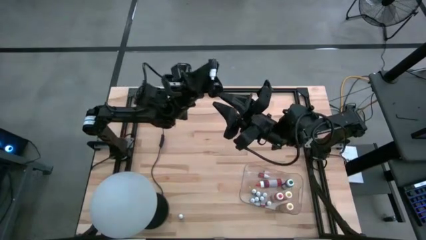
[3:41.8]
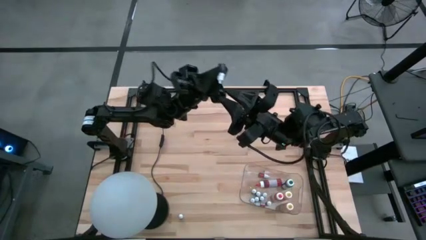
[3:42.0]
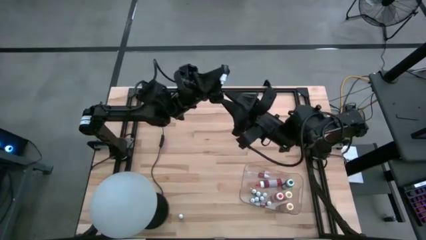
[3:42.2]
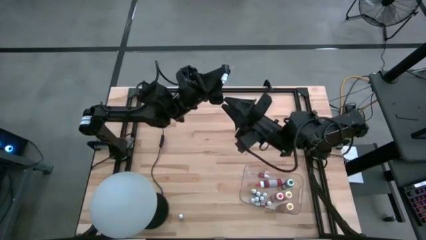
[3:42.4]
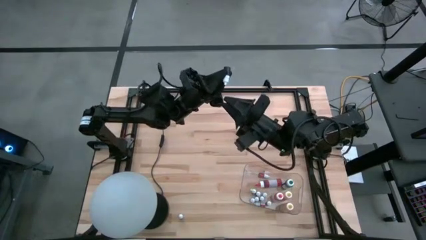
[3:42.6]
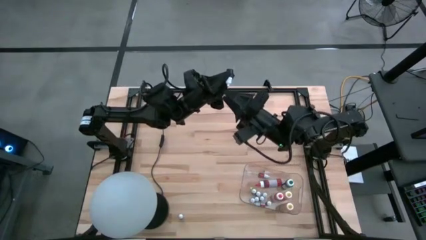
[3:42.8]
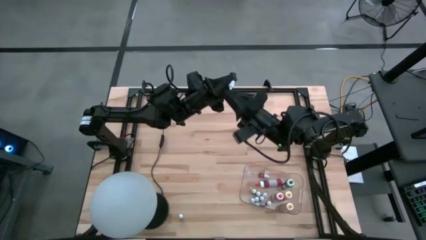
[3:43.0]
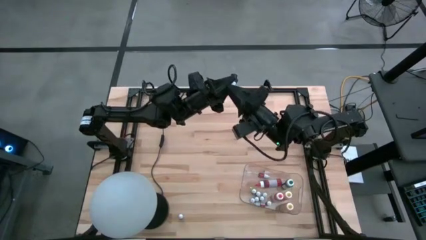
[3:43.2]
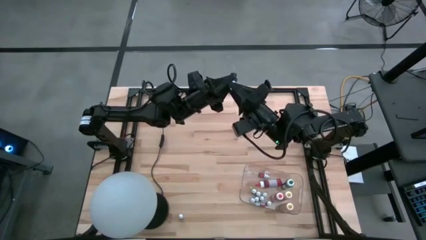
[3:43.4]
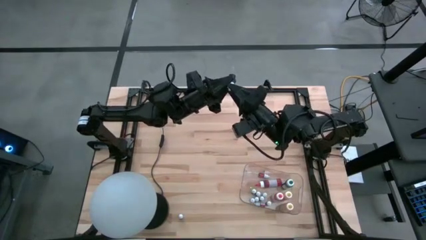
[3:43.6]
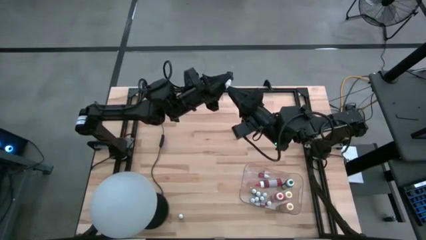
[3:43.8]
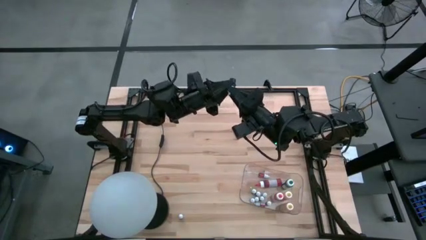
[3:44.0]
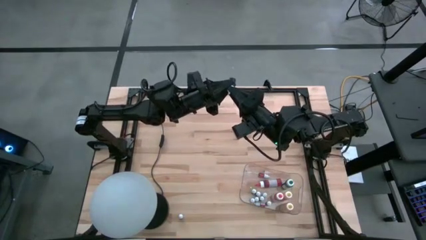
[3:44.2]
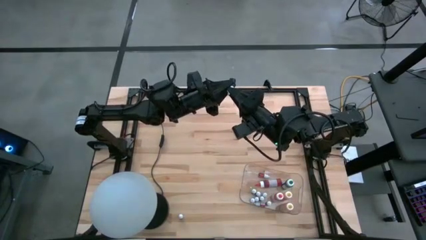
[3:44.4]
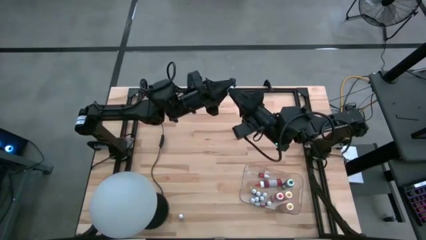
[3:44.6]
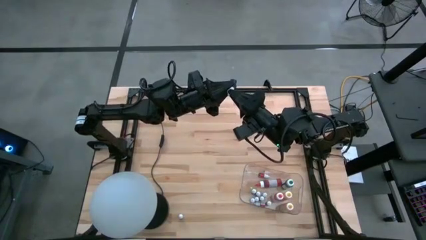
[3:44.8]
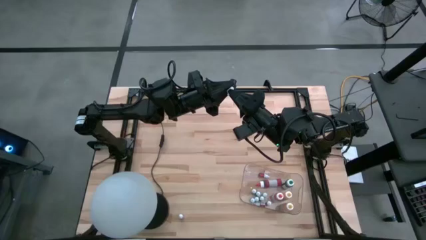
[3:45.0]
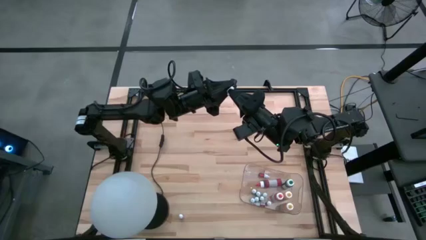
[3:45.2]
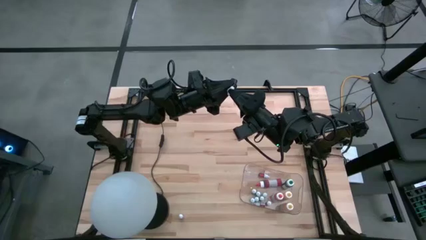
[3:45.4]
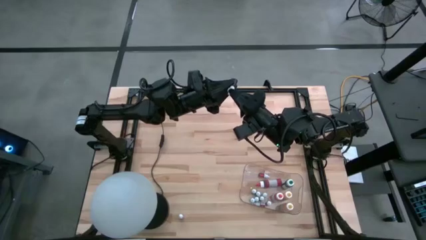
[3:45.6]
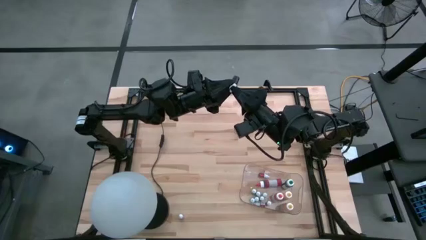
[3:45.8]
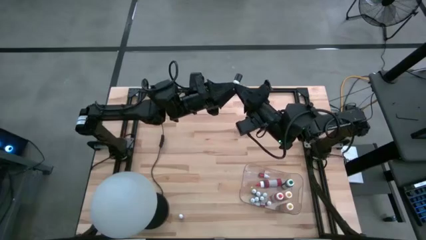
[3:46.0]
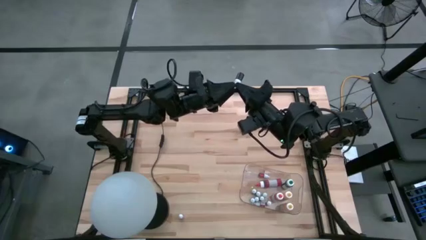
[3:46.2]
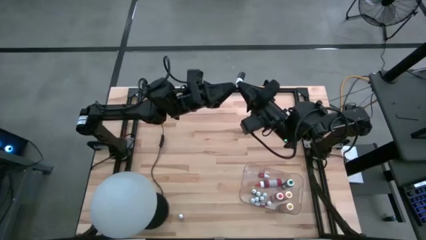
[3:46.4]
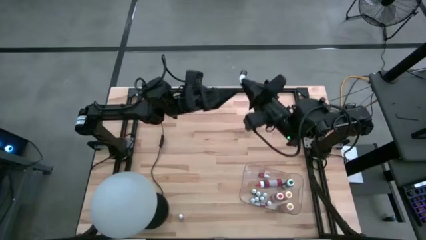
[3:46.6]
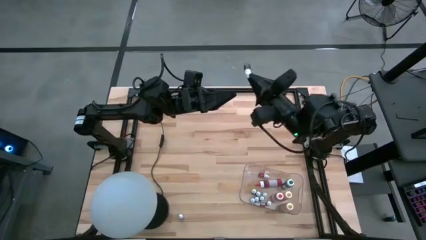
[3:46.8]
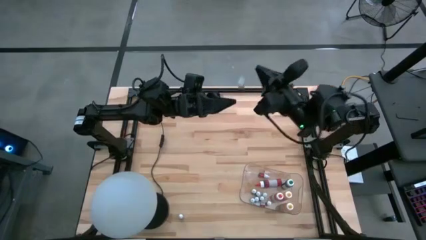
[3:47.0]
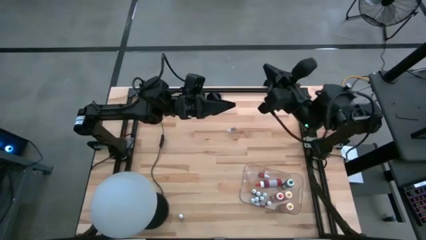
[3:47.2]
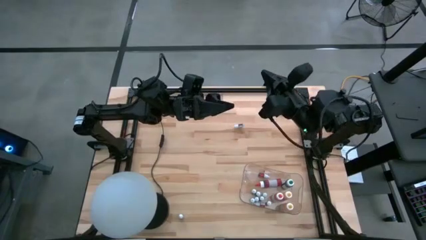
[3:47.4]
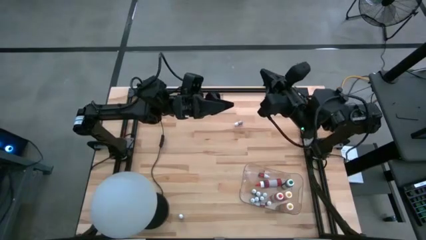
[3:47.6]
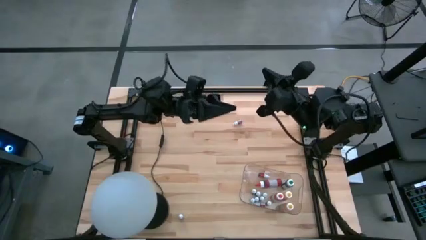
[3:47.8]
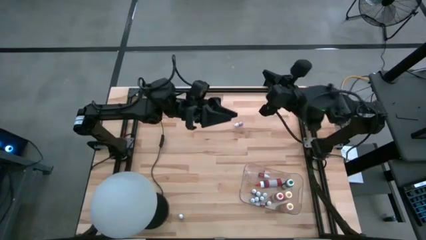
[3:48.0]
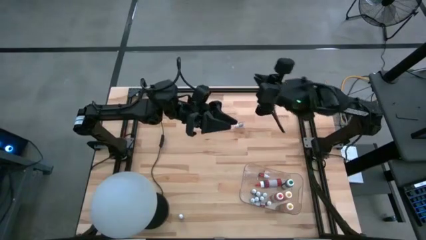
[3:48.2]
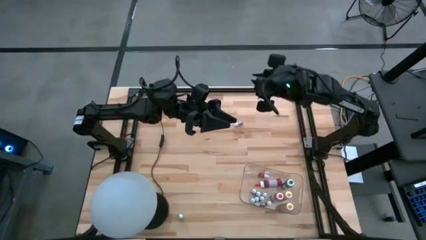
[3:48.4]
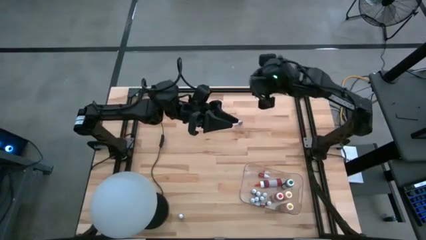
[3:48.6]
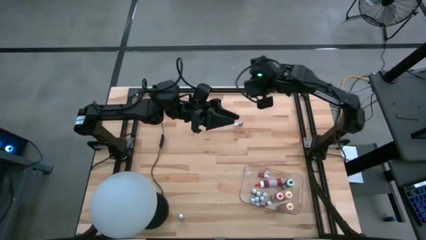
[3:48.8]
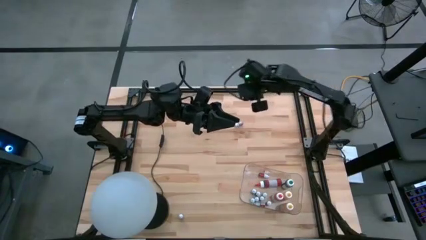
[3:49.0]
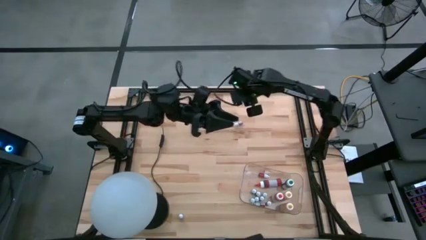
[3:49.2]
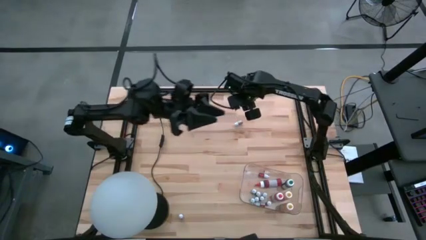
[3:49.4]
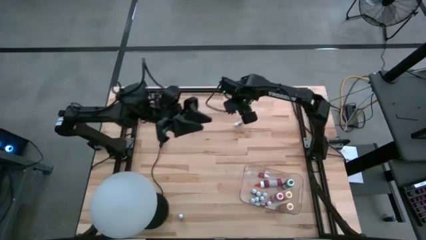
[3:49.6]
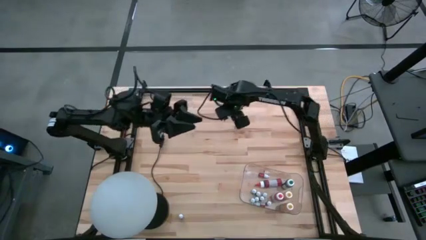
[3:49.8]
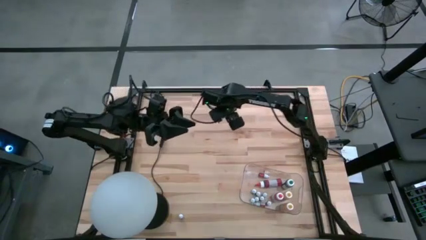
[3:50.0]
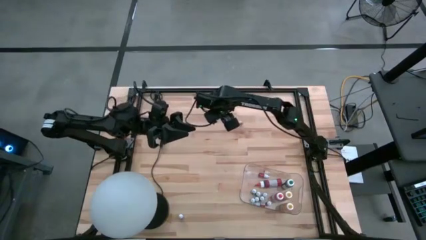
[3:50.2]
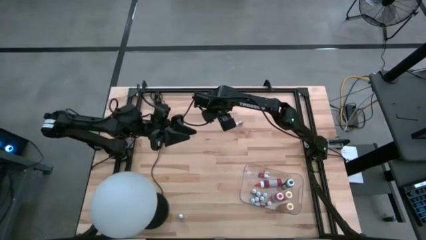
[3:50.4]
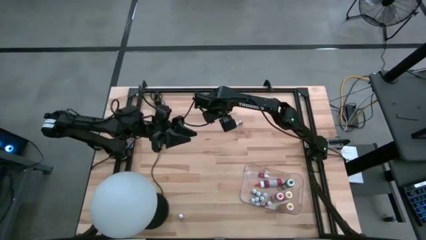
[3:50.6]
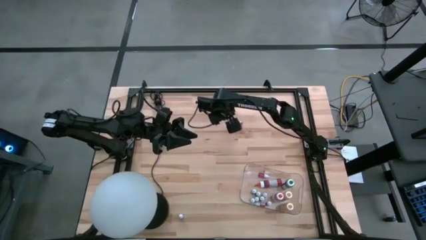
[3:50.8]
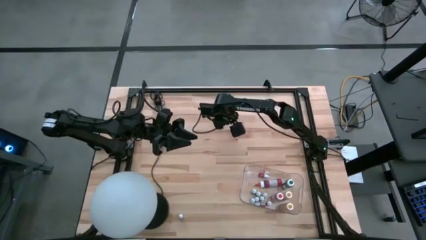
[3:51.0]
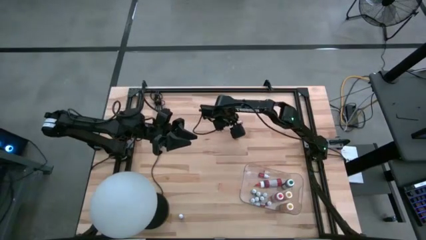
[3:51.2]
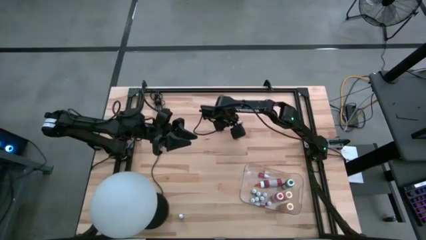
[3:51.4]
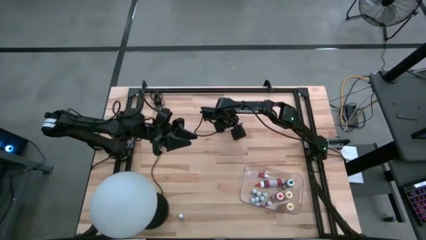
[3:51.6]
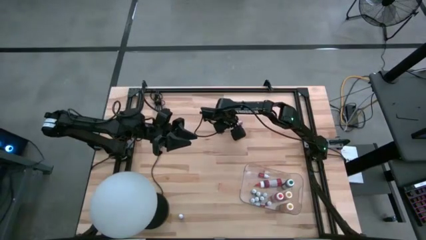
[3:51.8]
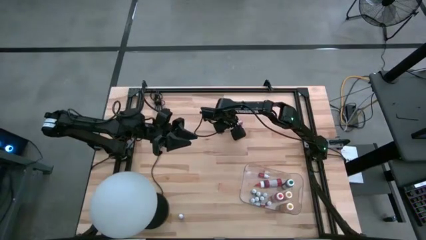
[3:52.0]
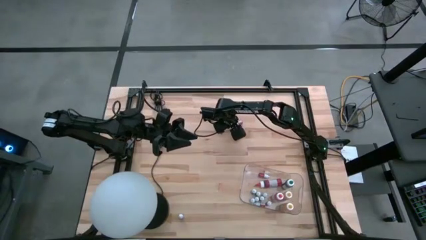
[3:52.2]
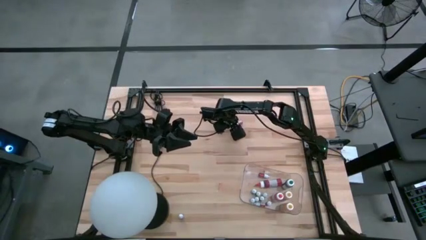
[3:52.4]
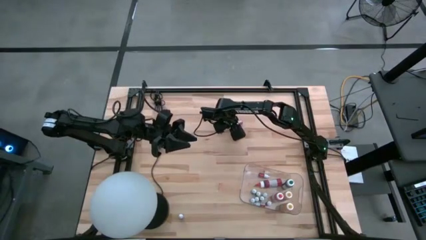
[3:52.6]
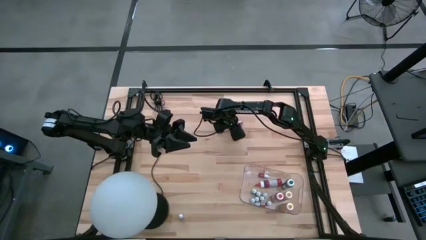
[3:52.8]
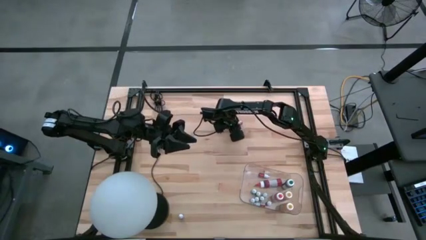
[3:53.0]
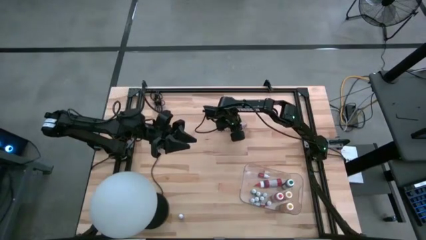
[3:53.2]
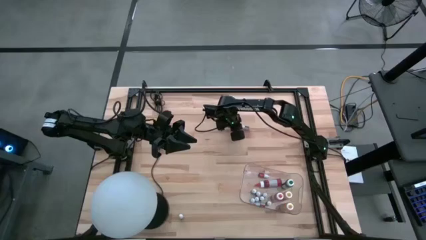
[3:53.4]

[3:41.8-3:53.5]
Task: Pick & Place food coloring
Put the pink food color into the transparent bin

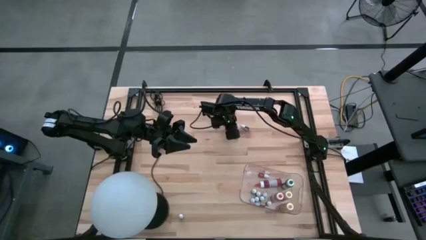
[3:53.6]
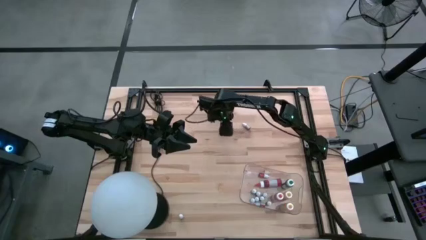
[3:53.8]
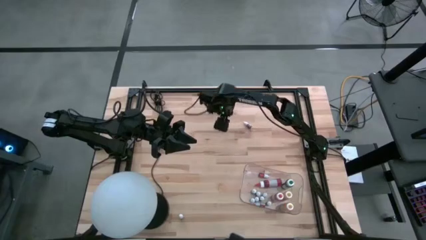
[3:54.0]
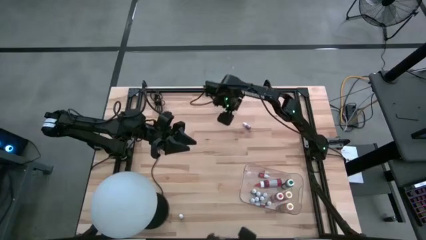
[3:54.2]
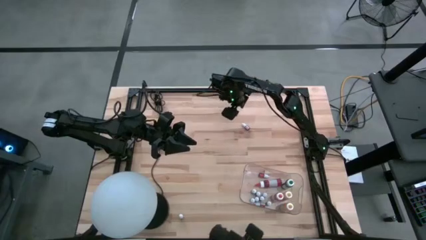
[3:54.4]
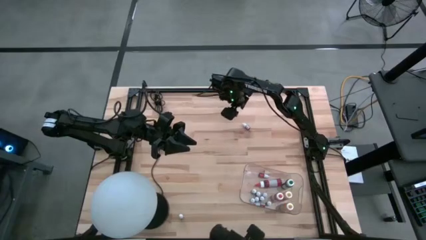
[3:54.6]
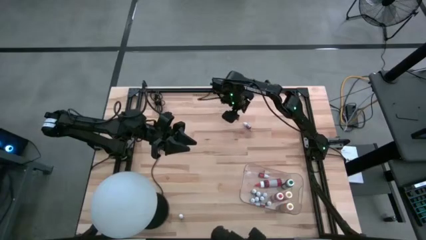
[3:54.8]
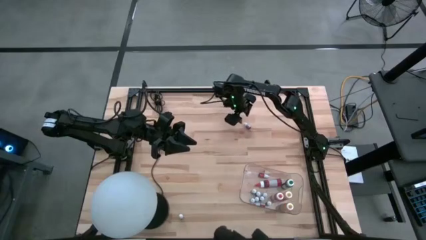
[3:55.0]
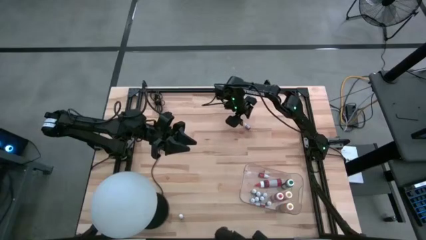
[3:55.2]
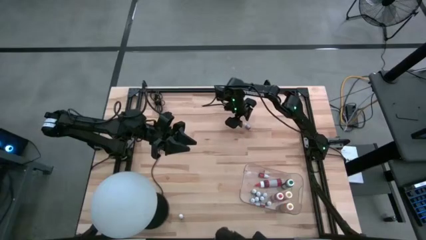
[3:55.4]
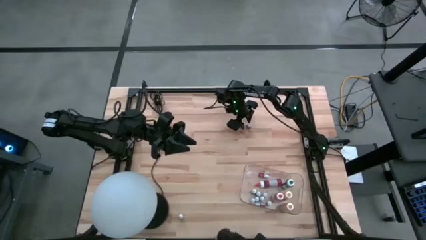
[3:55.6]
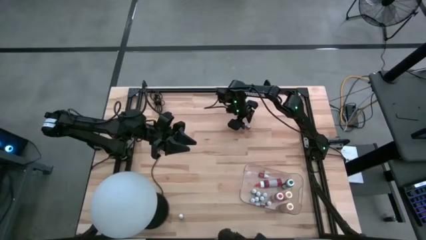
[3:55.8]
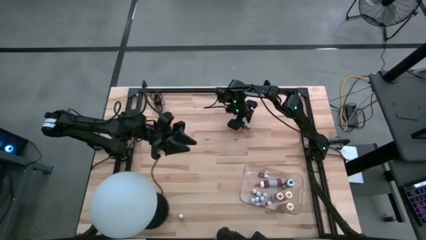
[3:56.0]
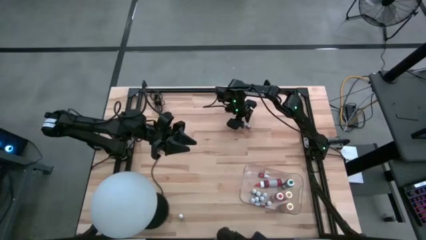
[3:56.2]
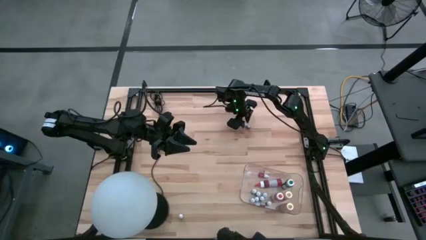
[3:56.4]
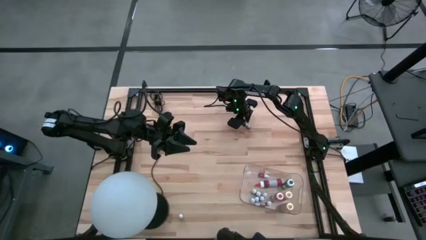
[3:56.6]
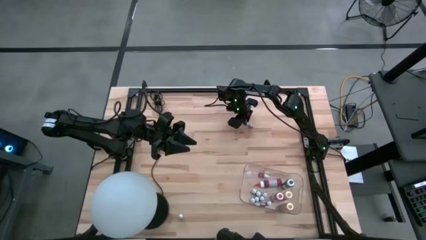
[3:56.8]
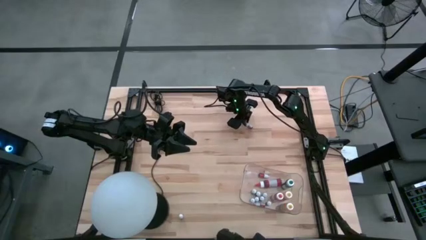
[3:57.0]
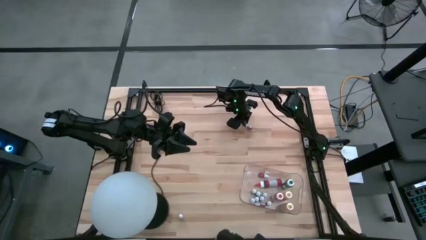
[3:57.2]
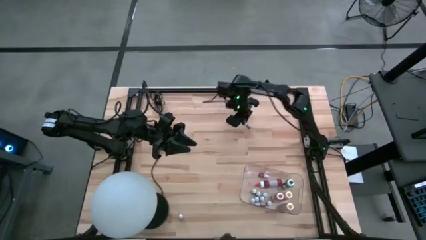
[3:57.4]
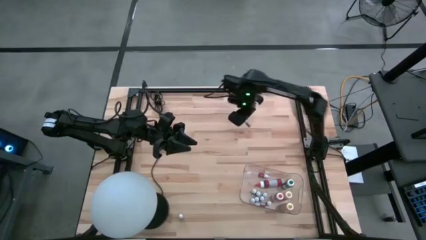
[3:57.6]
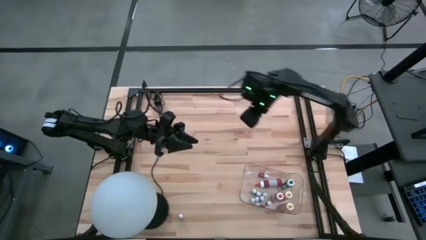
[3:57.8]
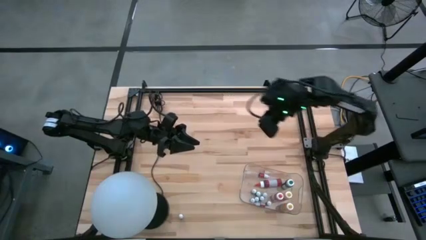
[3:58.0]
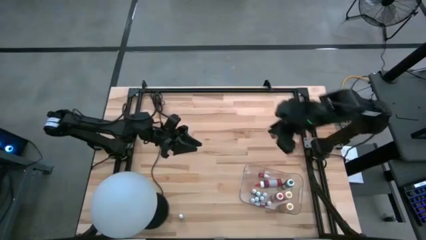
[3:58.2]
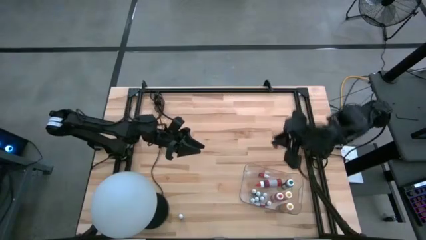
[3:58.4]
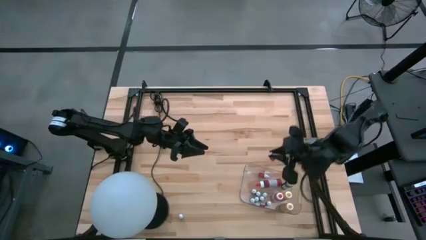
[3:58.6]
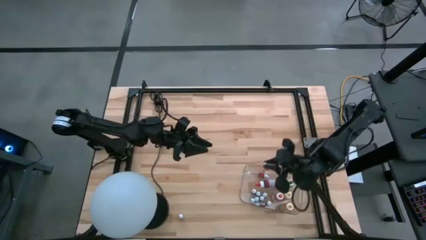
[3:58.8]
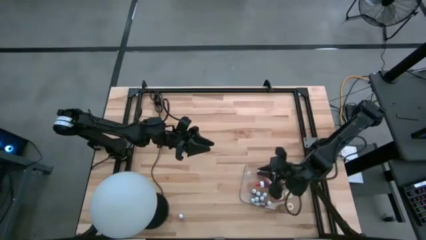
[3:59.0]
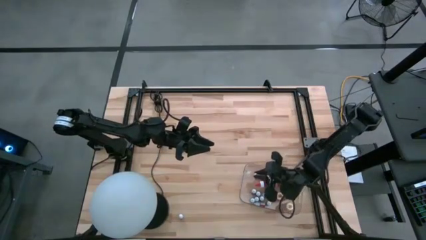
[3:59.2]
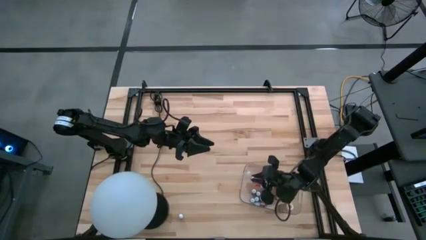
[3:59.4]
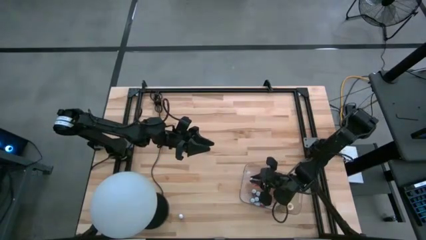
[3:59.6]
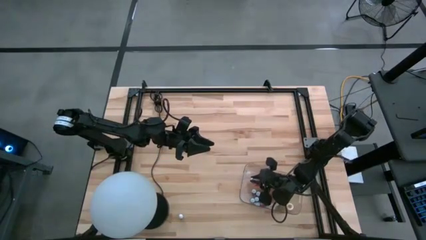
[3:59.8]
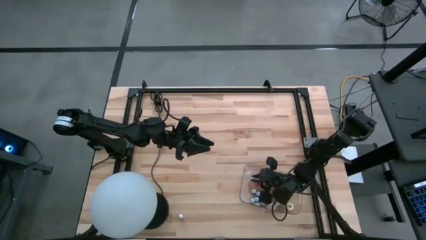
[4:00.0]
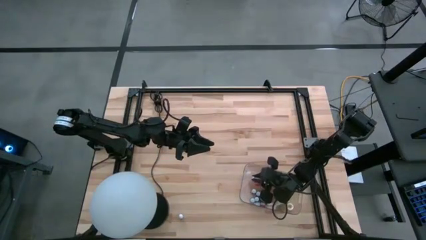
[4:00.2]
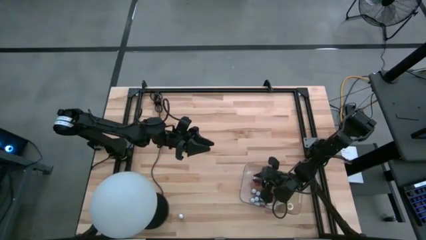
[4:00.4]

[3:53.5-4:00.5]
Put the pink food color into the transparent bin
